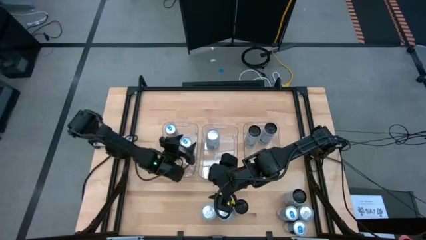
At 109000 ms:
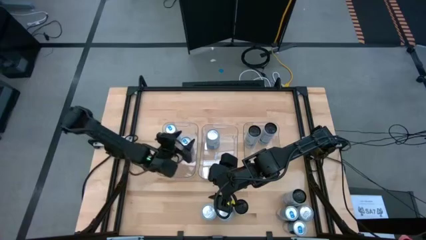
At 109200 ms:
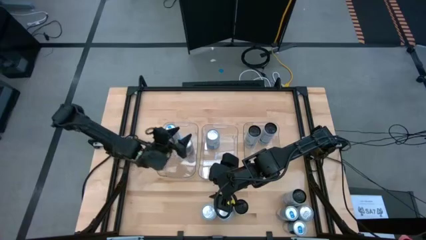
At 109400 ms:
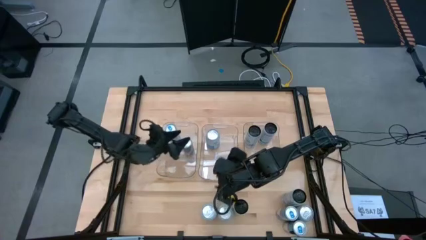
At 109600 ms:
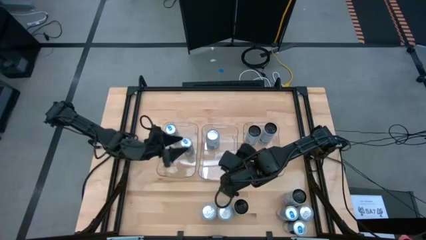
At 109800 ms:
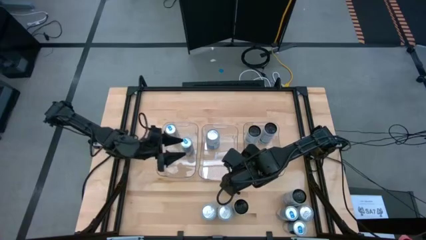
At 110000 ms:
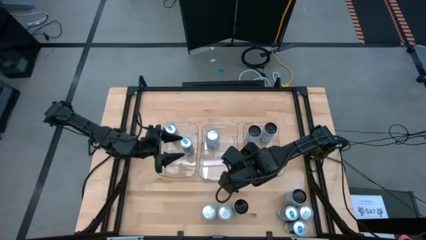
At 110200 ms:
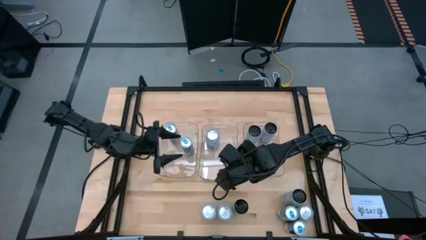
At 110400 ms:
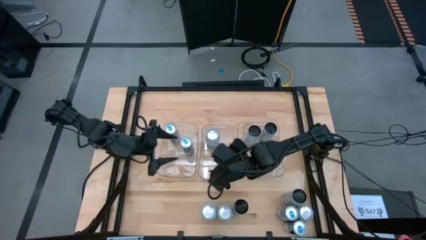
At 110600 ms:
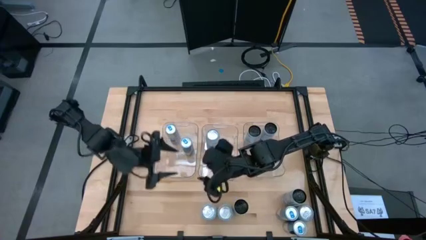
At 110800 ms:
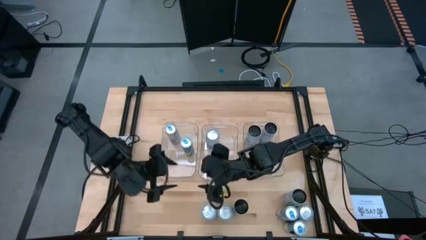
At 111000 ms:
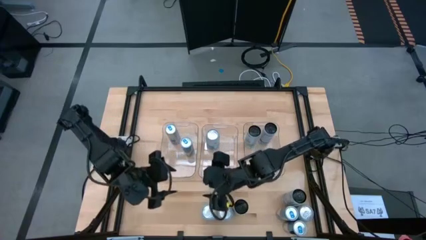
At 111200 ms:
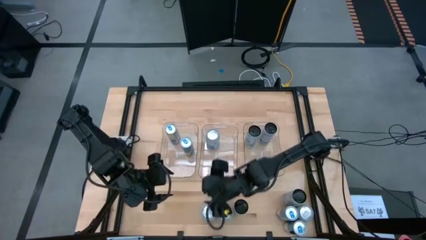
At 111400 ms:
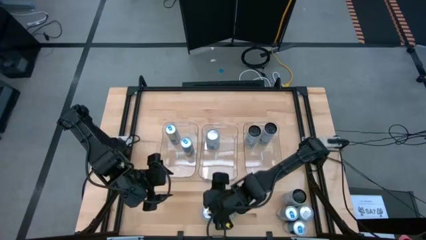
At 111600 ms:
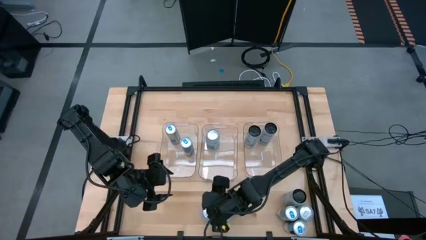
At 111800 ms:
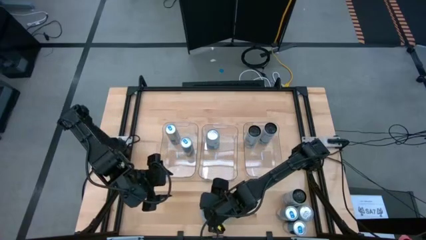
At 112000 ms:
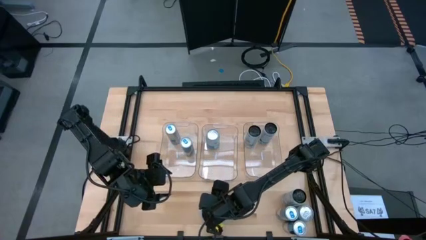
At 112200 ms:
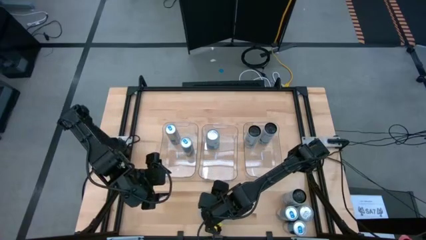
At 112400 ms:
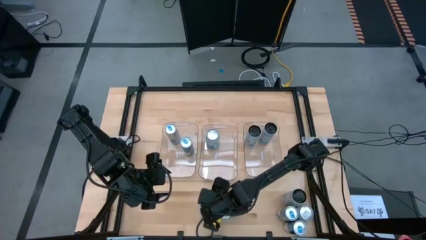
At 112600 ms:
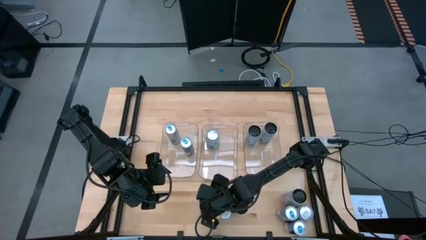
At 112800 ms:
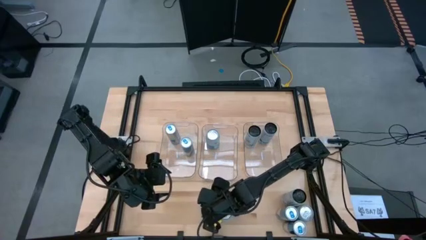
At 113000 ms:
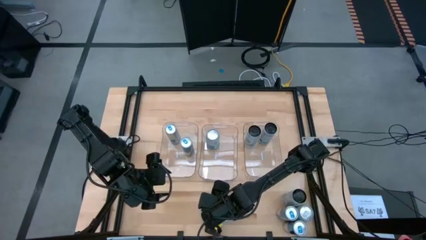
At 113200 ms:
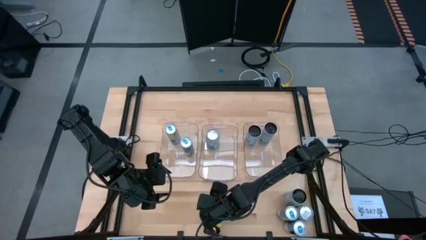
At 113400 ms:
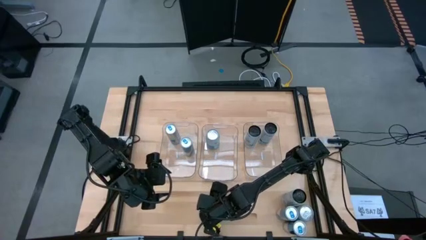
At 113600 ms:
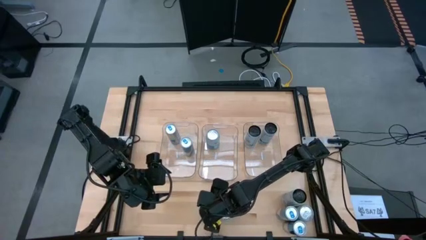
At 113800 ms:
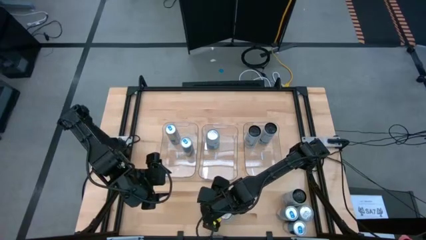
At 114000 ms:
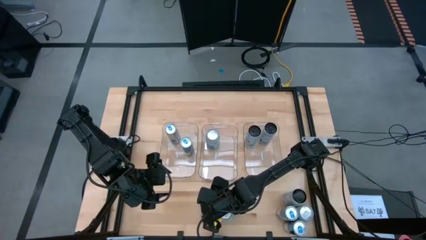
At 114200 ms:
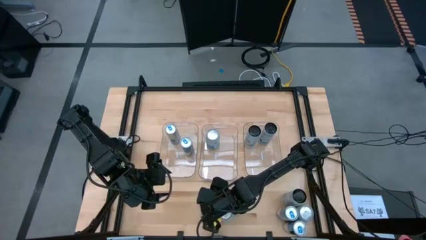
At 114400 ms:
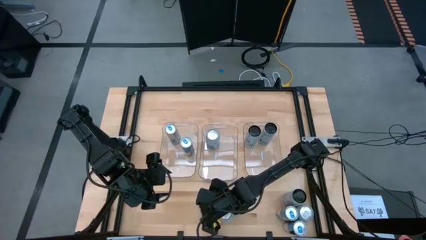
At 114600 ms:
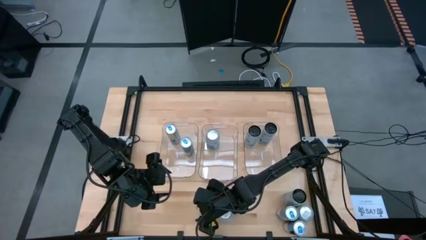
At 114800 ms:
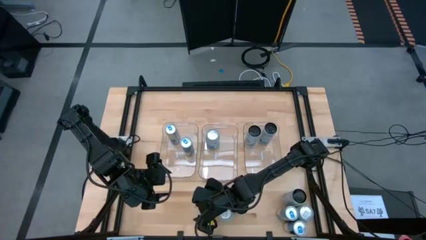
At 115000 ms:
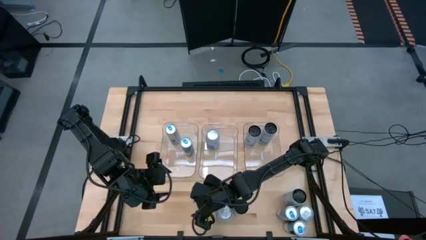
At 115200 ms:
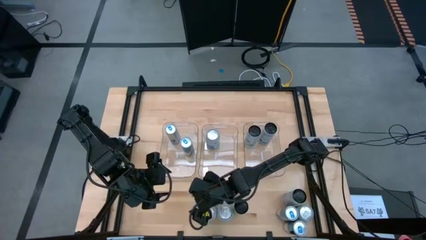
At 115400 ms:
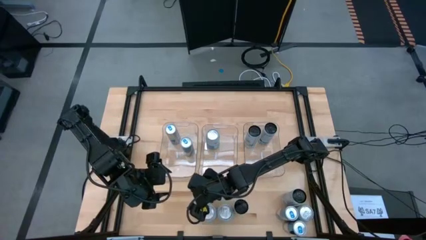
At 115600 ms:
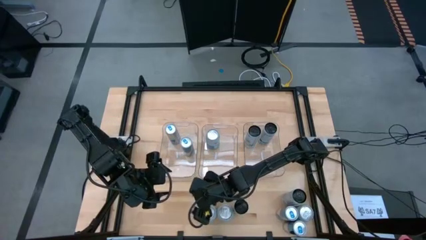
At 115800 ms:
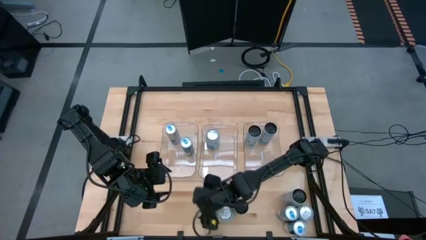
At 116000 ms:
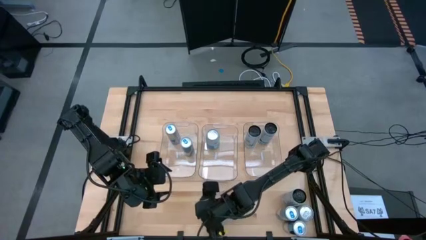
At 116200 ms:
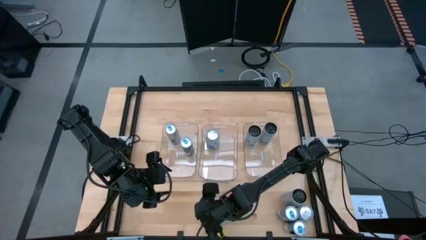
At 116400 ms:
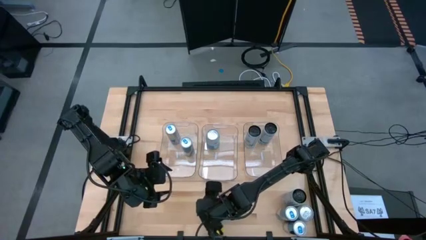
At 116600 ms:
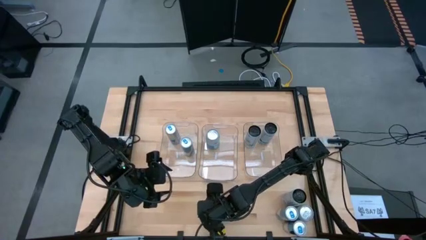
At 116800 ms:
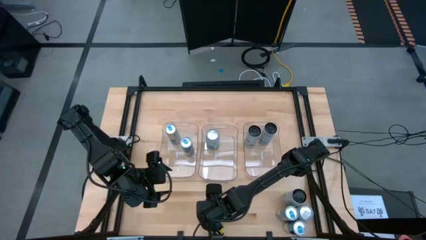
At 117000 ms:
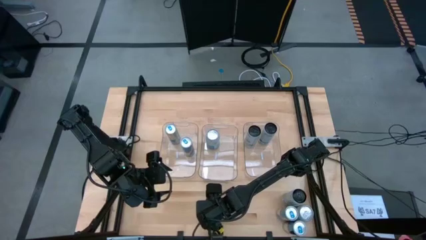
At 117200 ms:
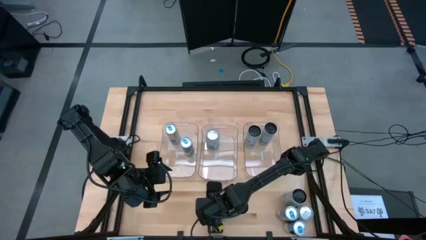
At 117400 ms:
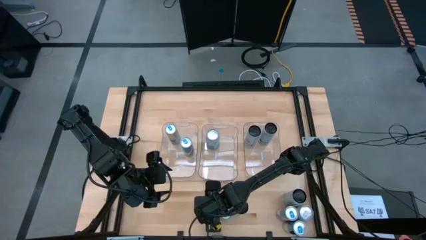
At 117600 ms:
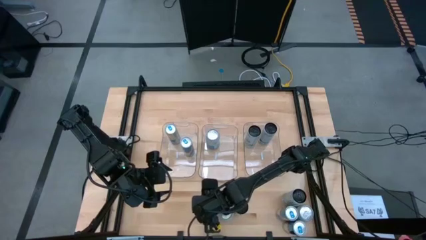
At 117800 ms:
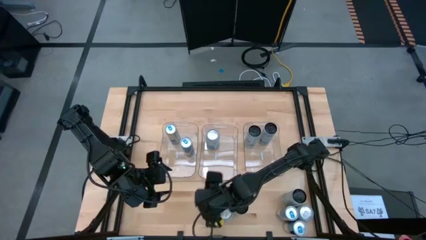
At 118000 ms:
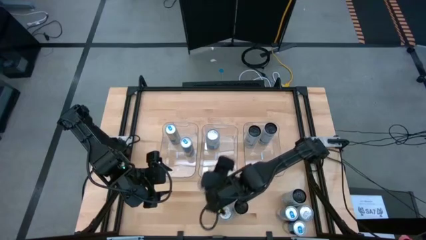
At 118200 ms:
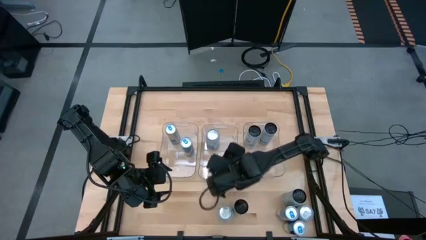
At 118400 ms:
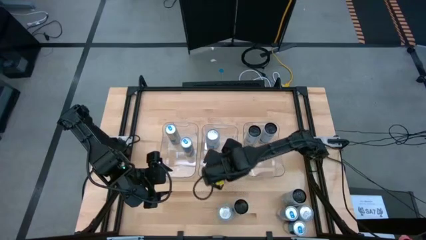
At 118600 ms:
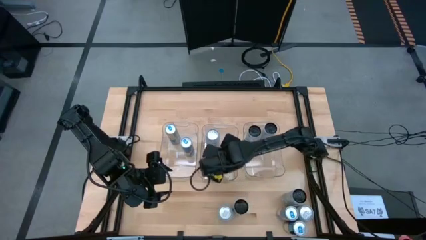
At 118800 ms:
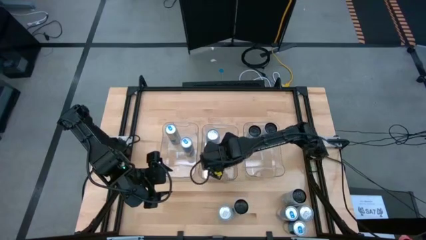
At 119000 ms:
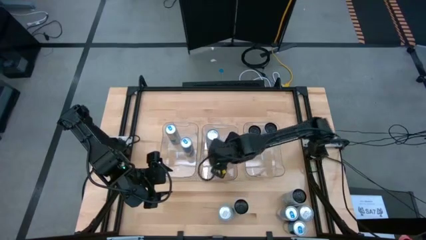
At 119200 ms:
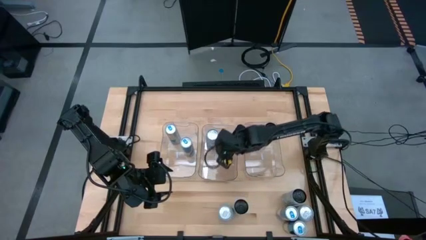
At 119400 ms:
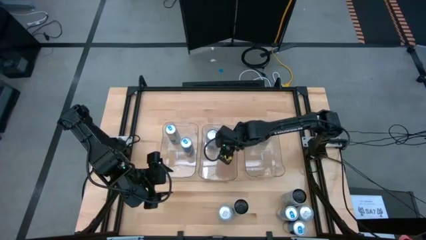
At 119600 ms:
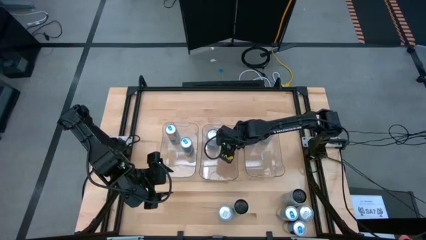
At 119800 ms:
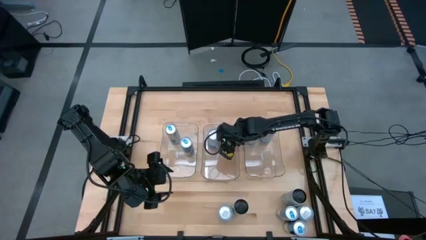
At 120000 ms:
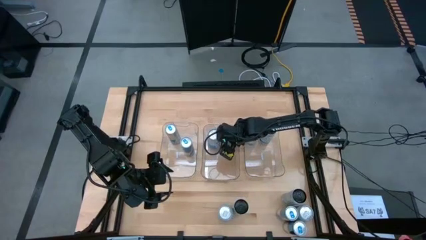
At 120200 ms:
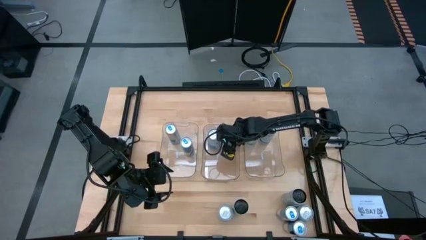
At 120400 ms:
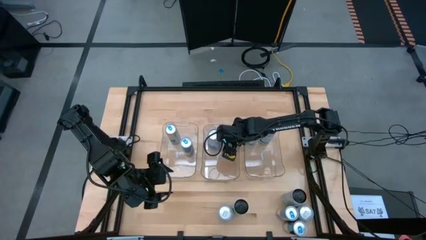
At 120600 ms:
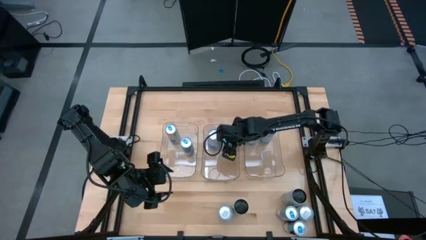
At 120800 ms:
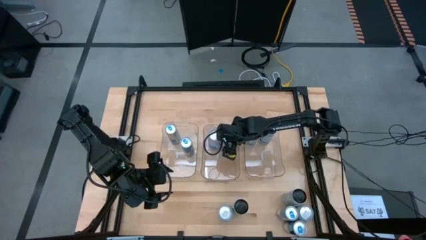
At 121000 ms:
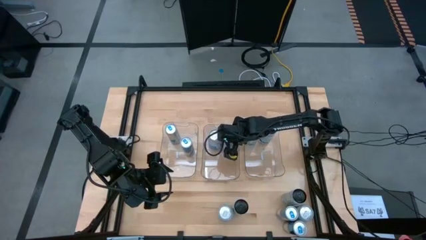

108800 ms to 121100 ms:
Task: Sort soda cans
Put the left blue-white soda can into the middle transparent bin

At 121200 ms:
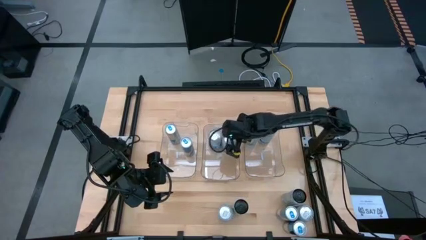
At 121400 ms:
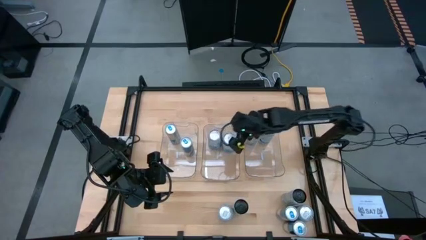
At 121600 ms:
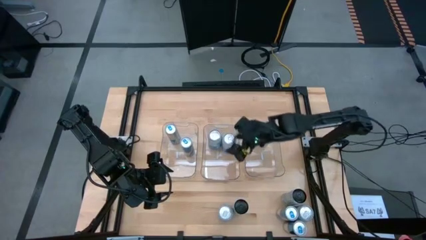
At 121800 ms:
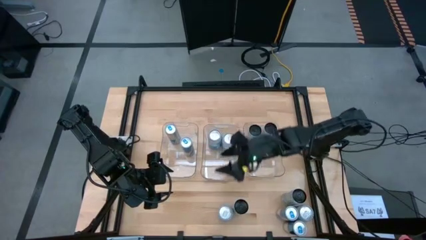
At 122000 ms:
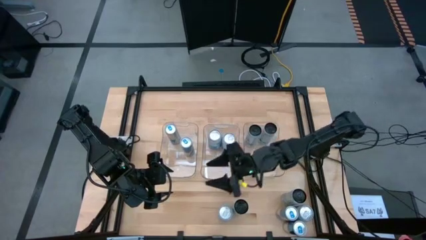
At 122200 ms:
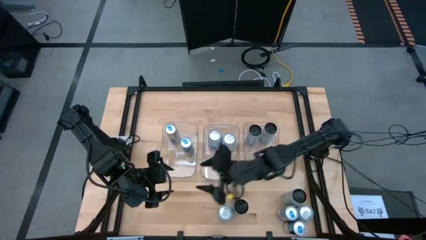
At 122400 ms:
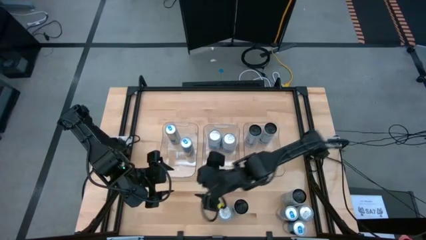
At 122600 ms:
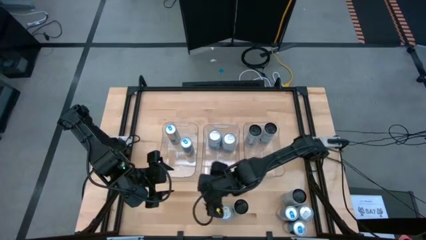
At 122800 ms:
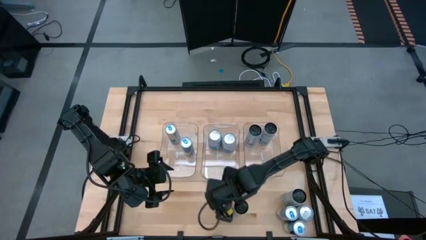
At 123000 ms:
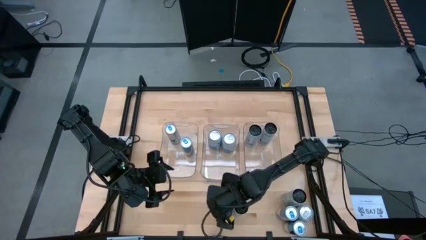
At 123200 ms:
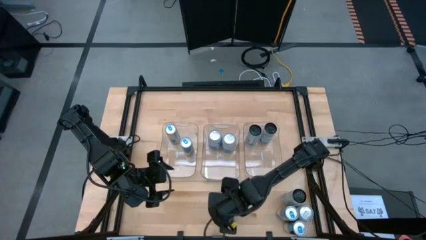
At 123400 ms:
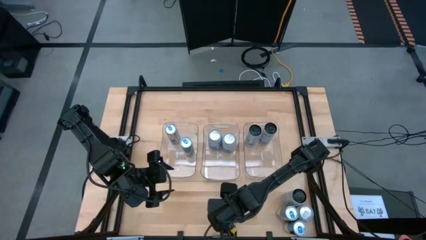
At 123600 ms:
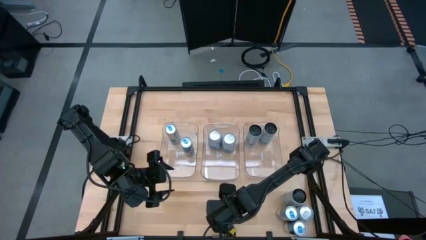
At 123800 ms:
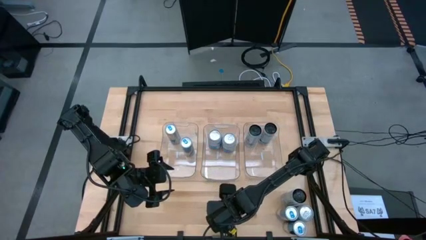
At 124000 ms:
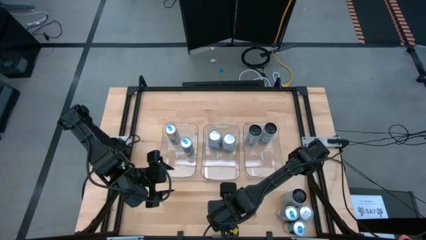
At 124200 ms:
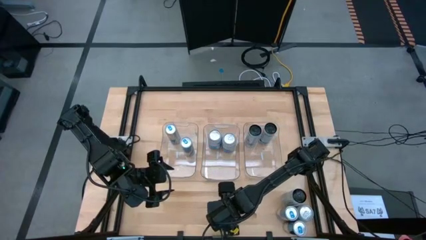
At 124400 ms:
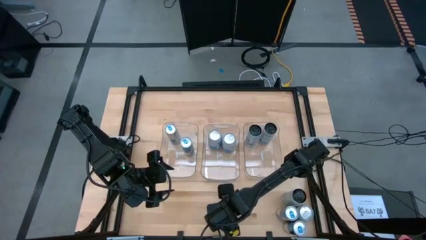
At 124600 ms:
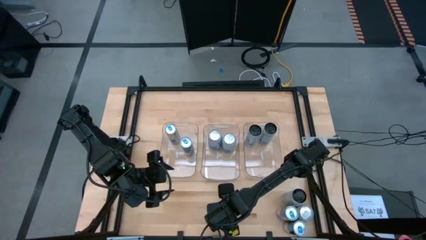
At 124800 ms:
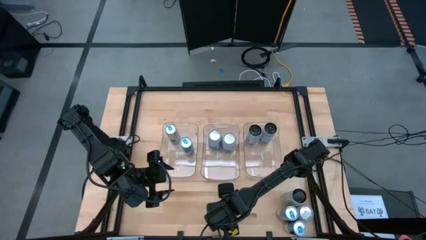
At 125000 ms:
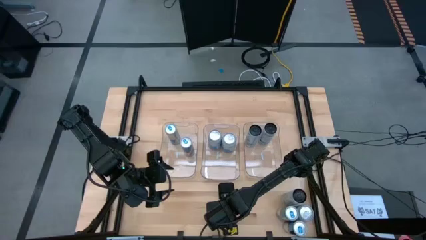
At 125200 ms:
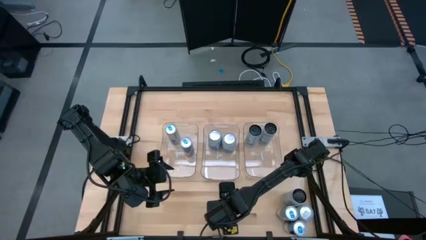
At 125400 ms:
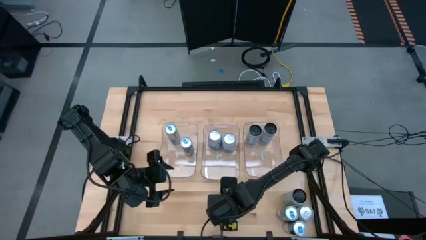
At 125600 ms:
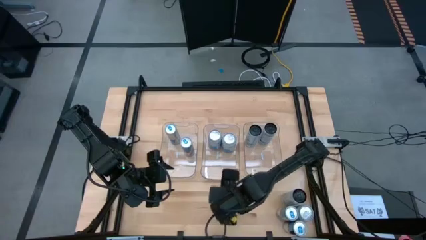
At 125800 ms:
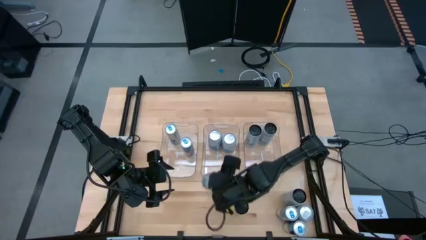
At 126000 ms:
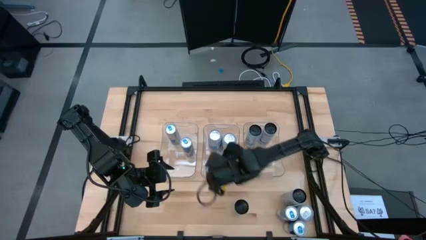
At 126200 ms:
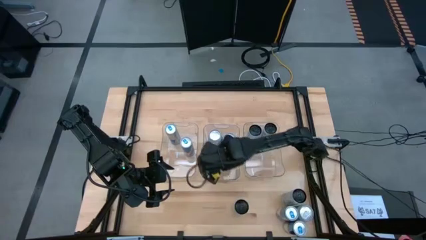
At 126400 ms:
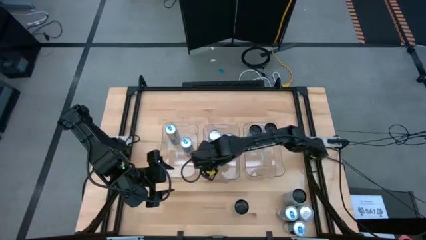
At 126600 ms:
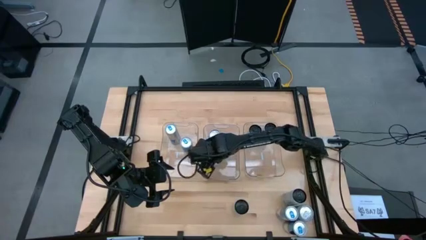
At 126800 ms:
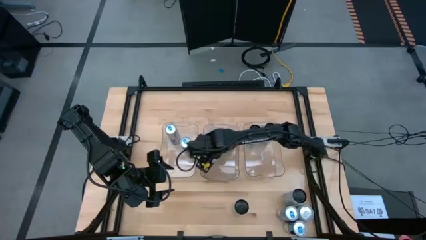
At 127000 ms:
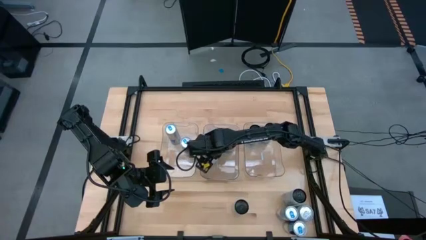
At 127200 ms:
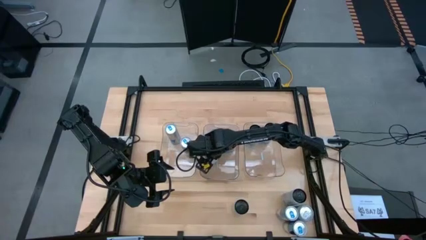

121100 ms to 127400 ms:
Put the left blue-white soda can into the middle transparent bin
